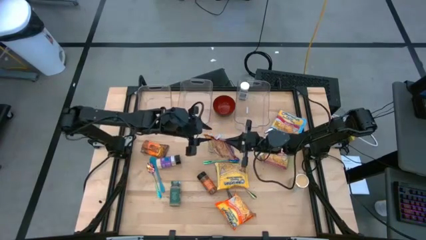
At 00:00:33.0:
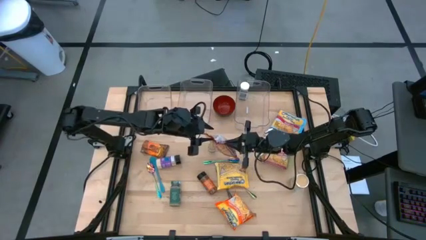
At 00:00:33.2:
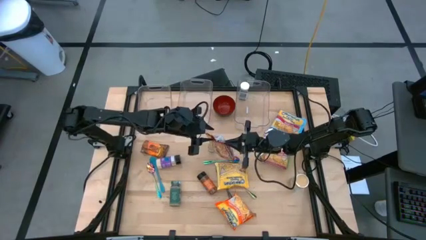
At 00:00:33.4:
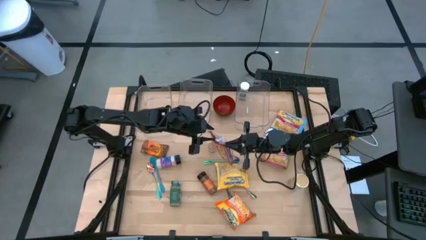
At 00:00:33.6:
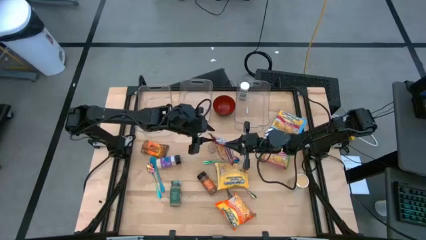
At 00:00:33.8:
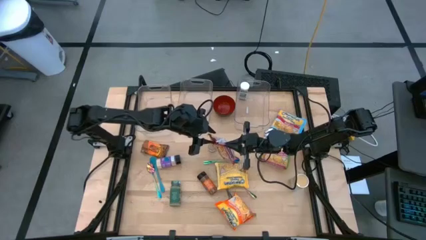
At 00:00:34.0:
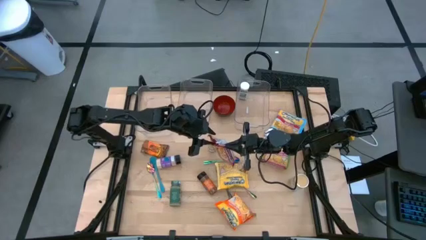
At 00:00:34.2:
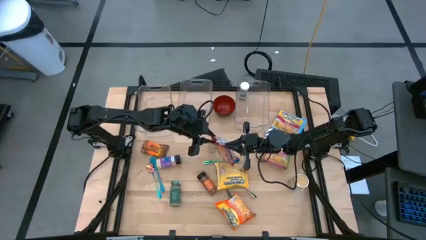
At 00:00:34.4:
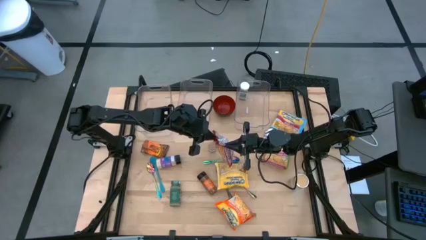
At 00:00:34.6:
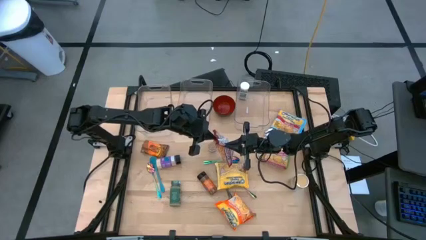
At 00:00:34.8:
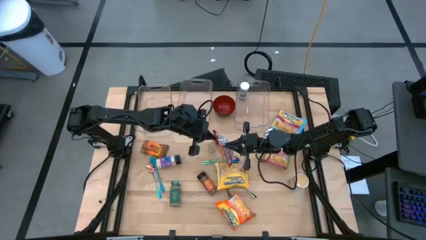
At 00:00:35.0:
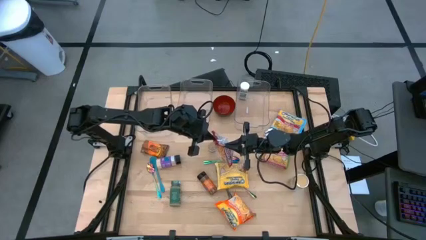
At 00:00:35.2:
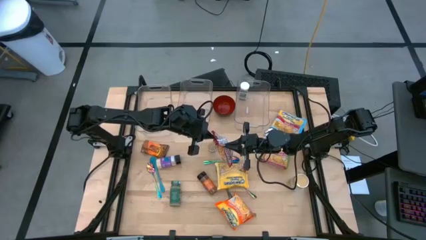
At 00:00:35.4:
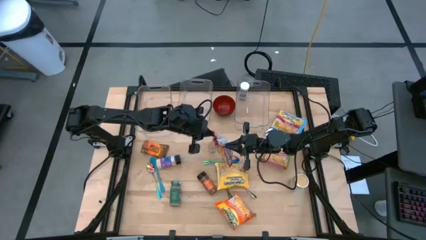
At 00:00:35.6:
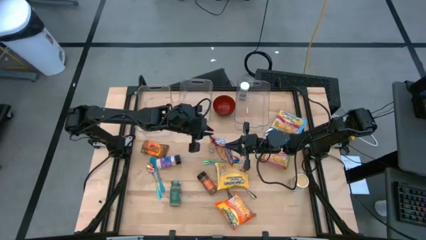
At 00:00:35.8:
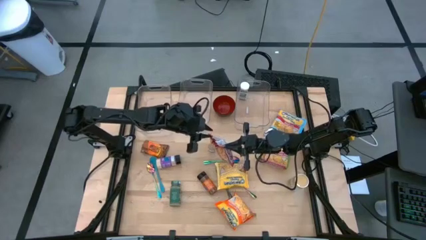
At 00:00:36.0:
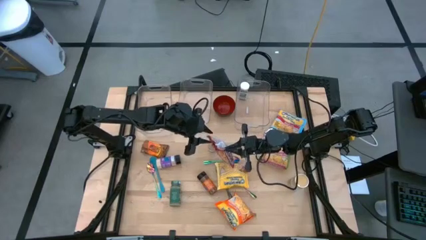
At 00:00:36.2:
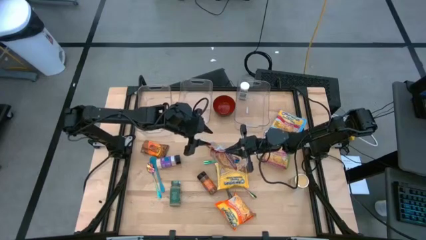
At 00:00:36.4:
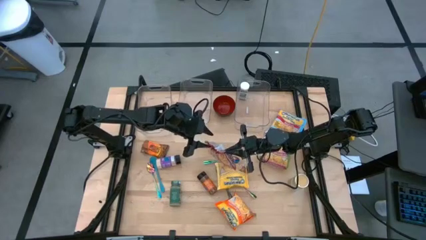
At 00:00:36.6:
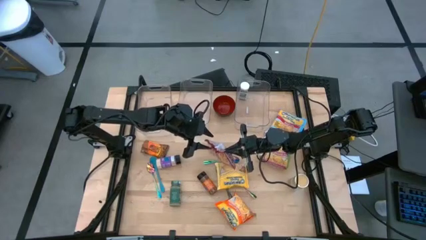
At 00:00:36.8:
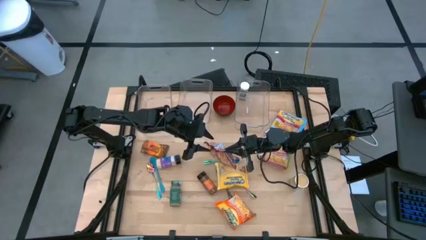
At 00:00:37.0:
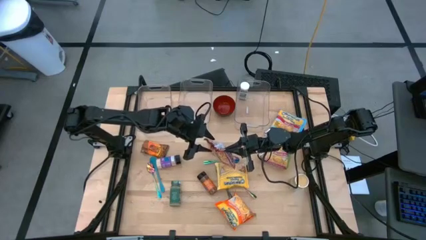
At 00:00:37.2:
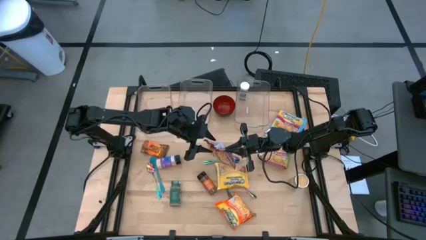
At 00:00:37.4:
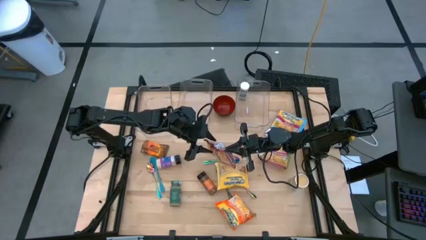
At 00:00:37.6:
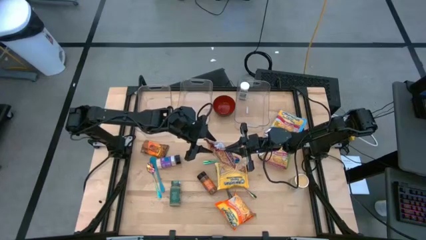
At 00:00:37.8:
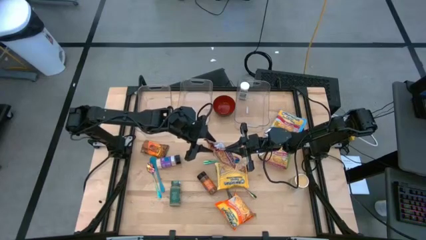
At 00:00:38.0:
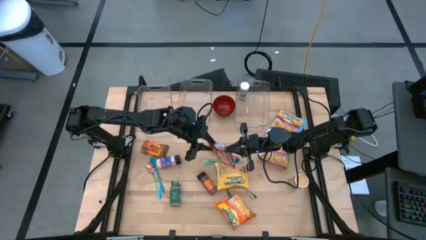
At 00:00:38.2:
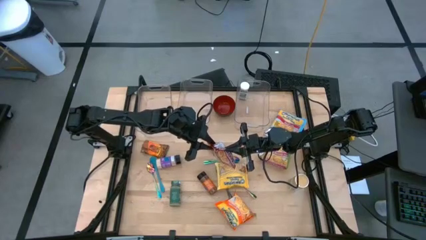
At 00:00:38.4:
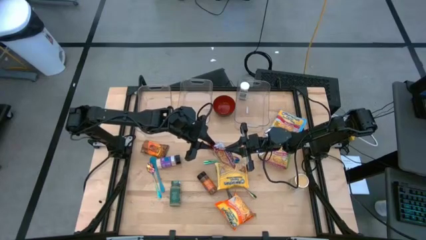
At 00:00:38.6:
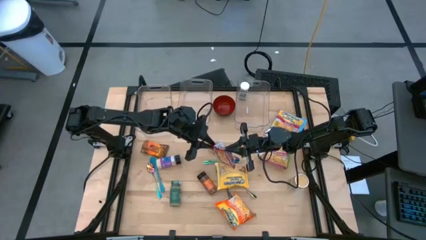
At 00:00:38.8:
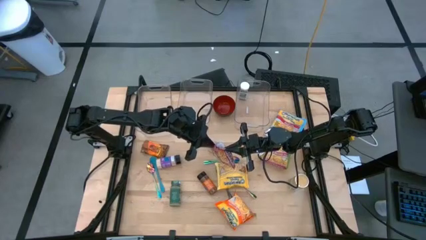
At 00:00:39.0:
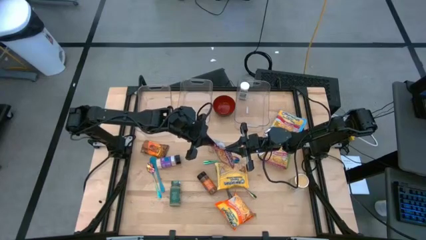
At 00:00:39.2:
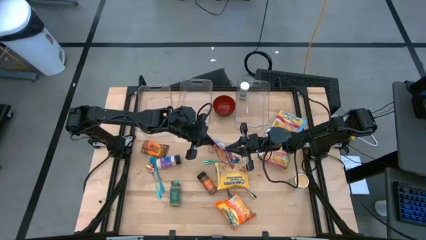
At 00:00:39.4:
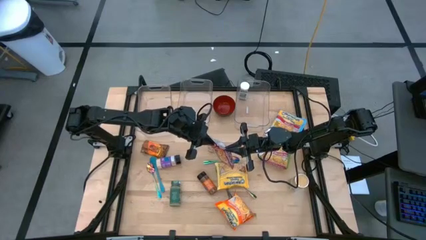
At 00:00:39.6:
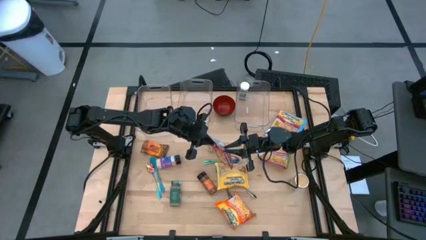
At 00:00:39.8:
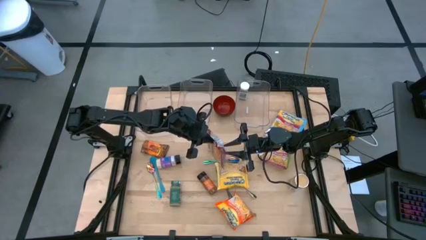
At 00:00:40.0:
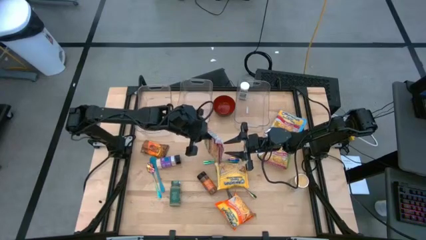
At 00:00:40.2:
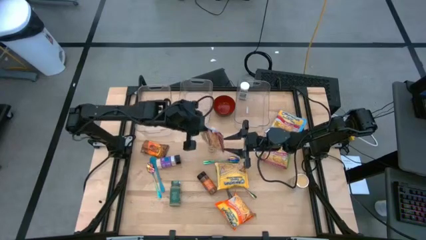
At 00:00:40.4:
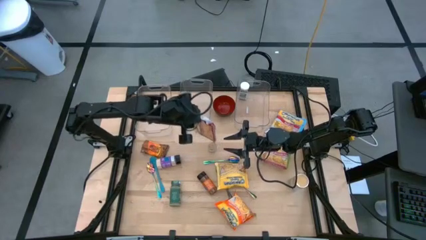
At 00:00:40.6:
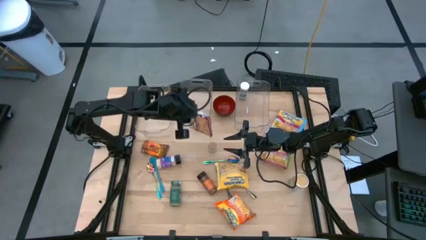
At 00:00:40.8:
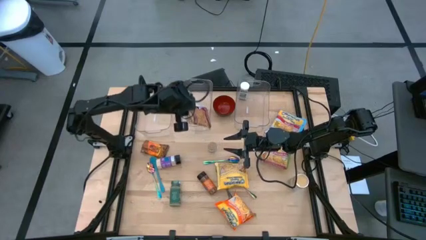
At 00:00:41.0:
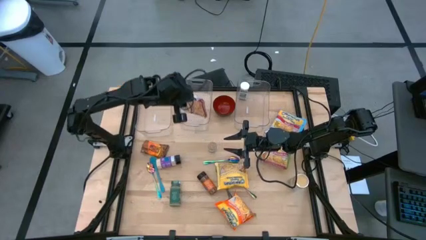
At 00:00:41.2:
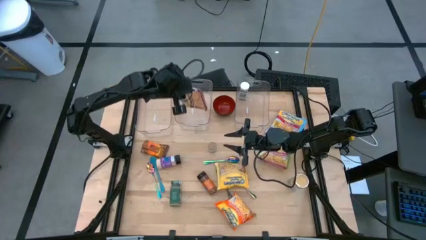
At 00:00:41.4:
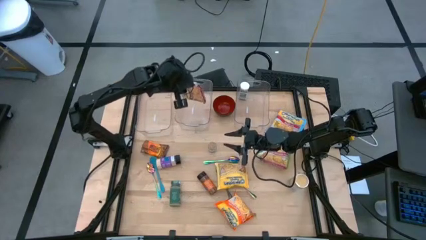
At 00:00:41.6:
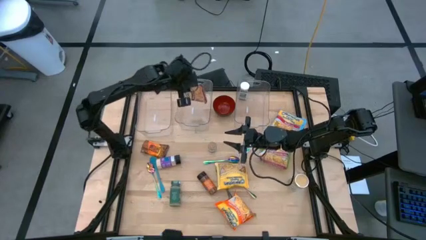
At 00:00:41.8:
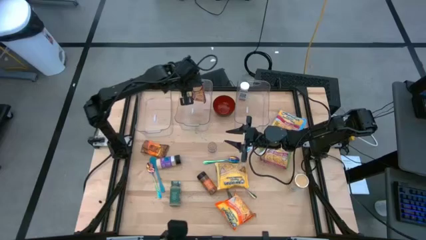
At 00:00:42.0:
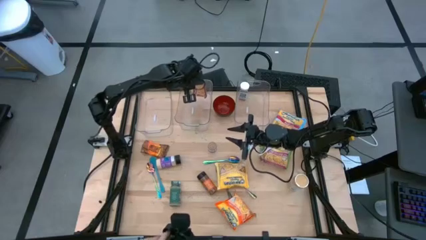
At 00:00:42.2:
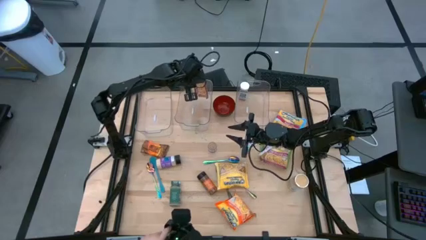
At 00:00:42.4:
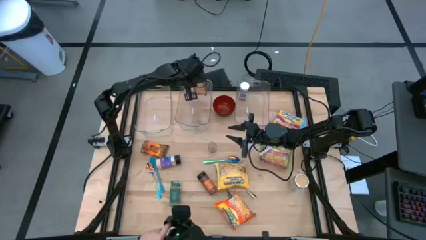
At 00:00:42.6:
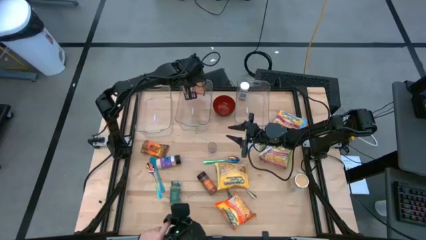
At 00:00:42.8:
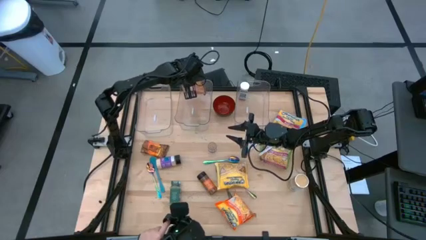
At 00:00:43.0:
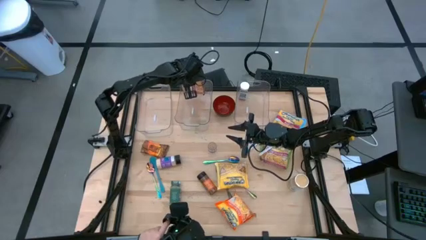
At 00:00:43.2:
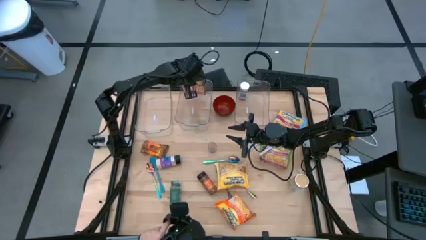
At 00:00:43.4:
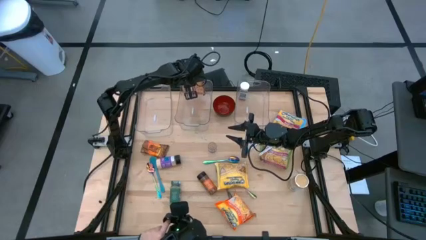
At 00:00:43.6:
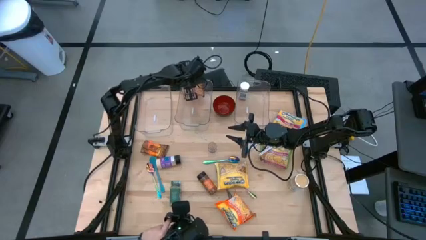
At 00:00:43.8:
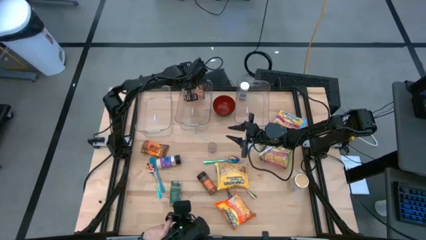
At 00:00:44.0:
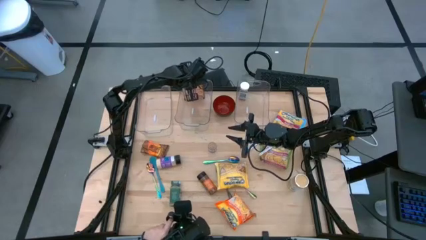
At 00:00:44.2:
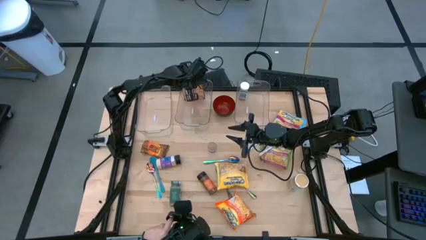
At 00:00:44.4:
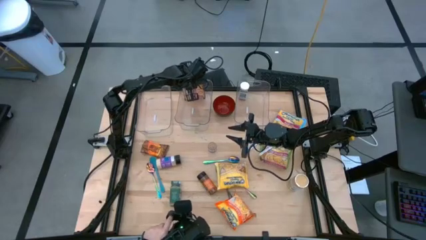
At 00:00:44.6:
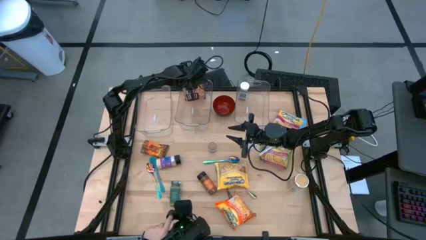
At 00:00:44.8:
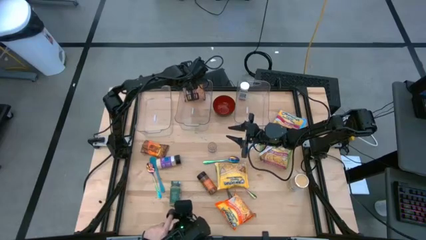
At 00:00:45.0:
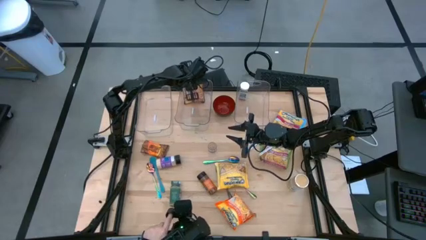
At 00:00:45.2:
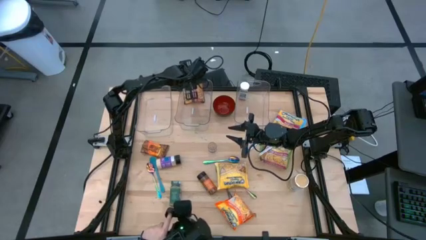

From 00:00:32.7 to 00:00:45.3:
Task: Pick & Place Food Item
Put the red noodle pack into the middle transparent bin
